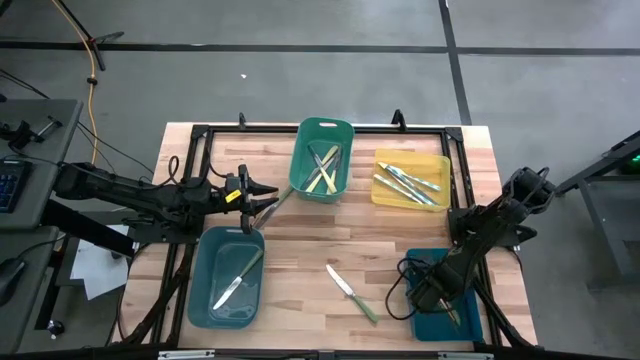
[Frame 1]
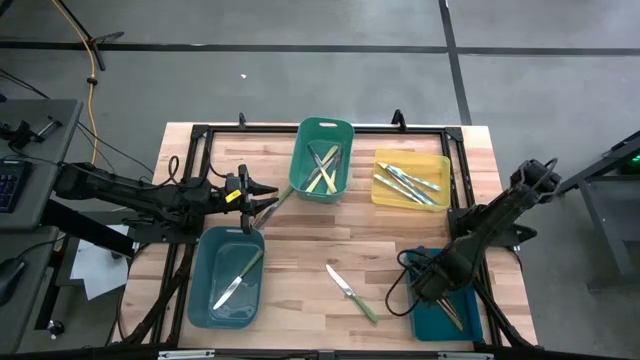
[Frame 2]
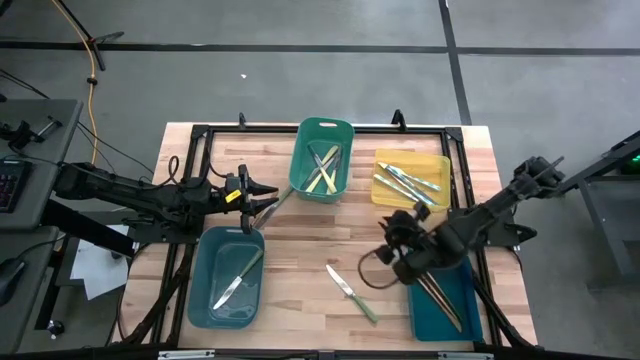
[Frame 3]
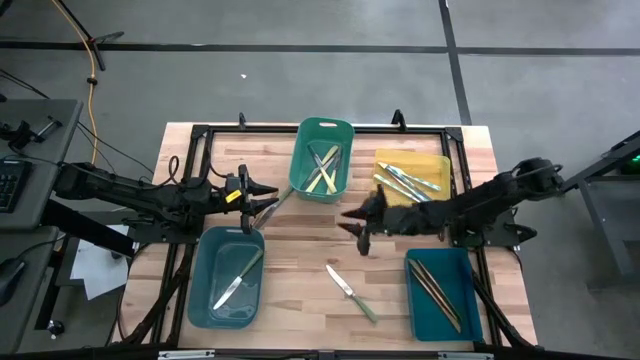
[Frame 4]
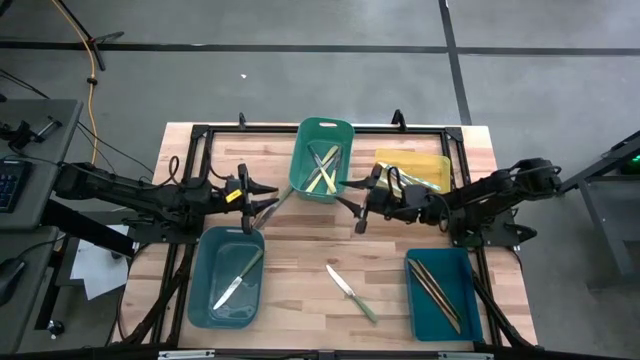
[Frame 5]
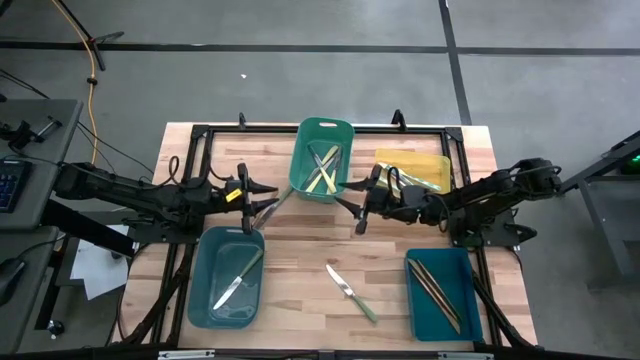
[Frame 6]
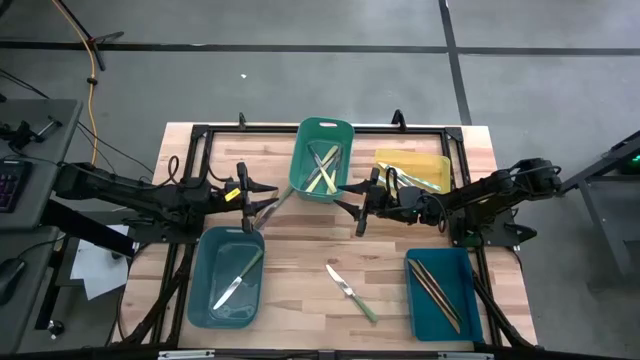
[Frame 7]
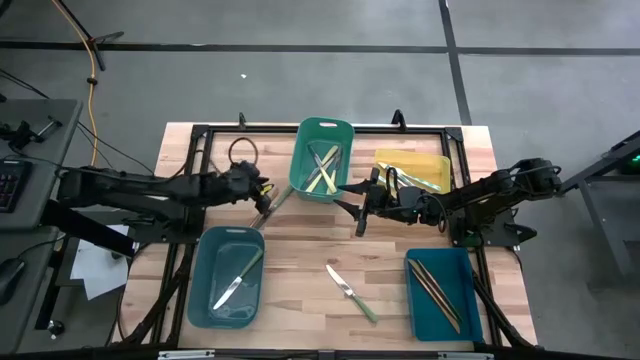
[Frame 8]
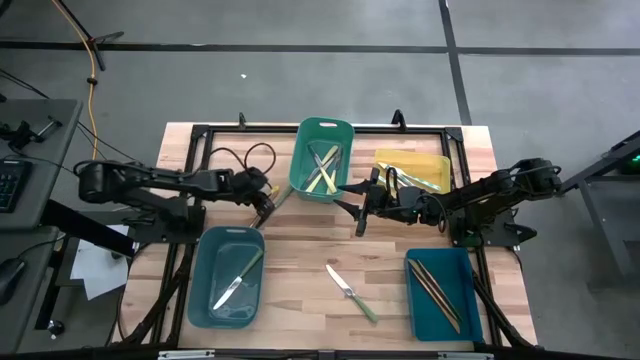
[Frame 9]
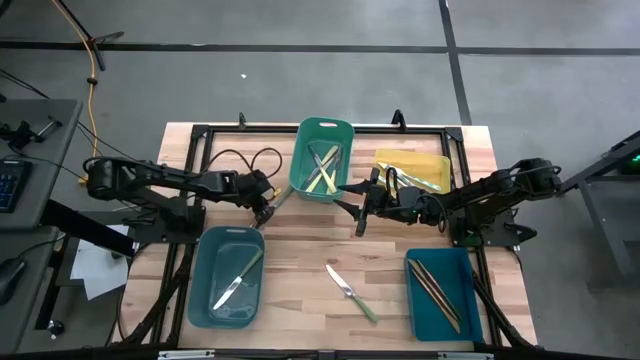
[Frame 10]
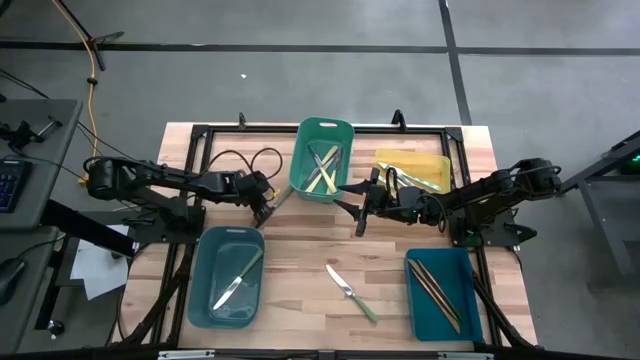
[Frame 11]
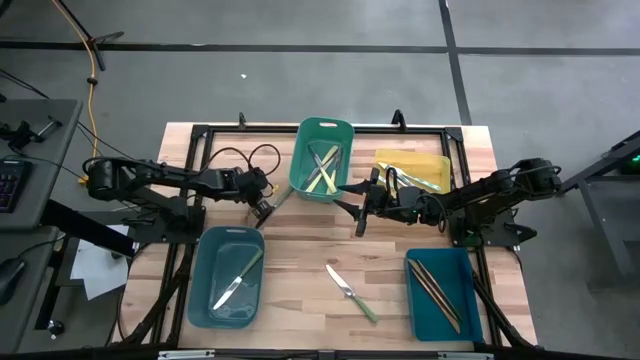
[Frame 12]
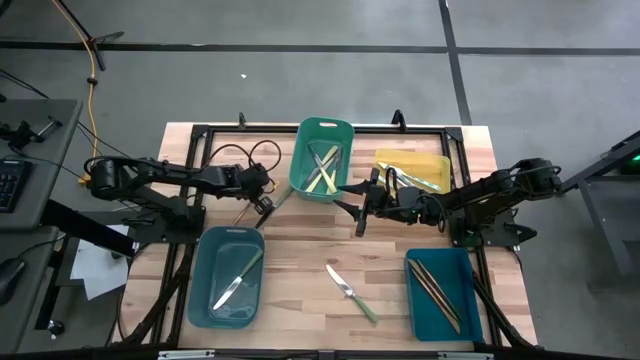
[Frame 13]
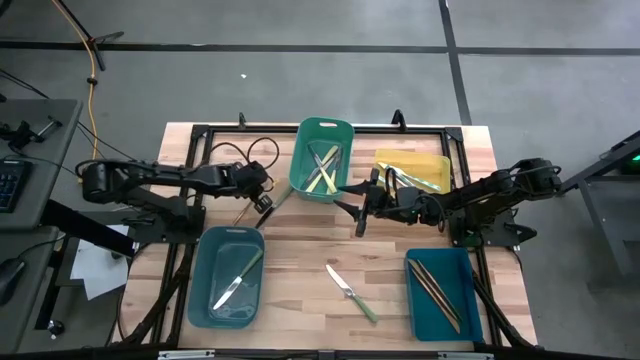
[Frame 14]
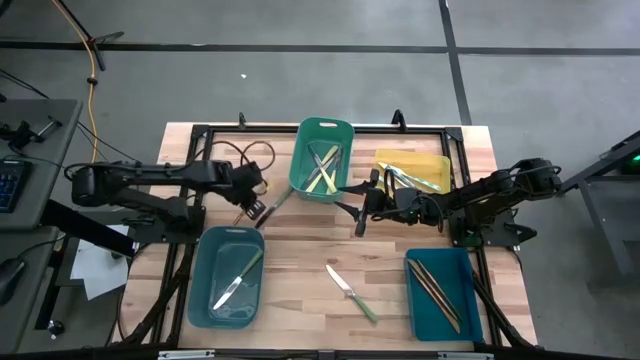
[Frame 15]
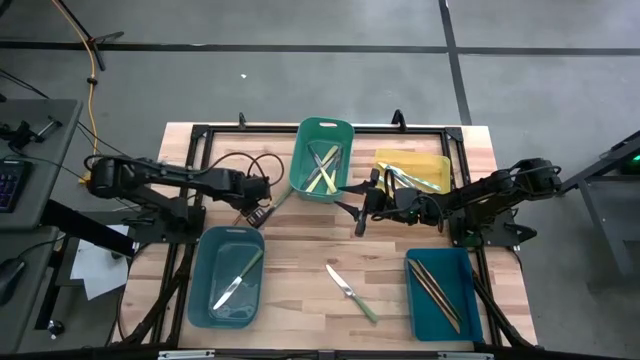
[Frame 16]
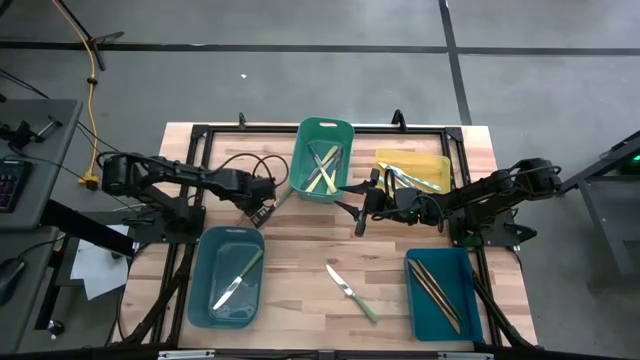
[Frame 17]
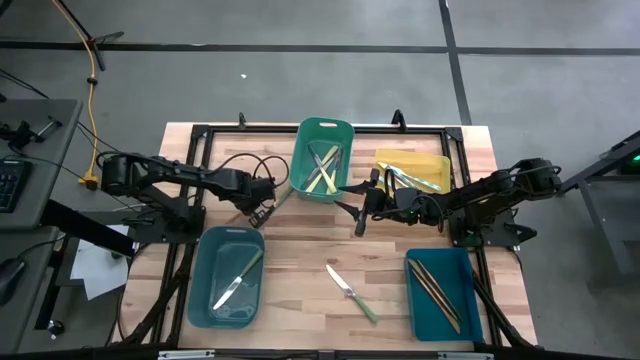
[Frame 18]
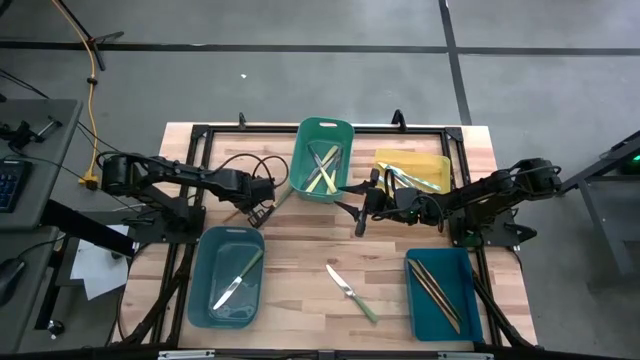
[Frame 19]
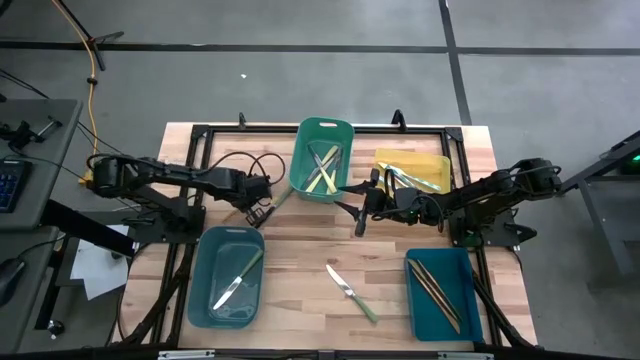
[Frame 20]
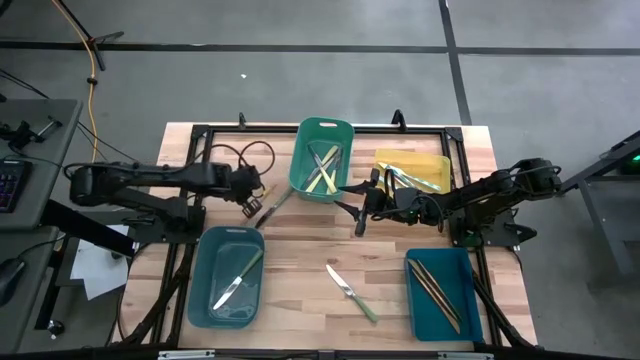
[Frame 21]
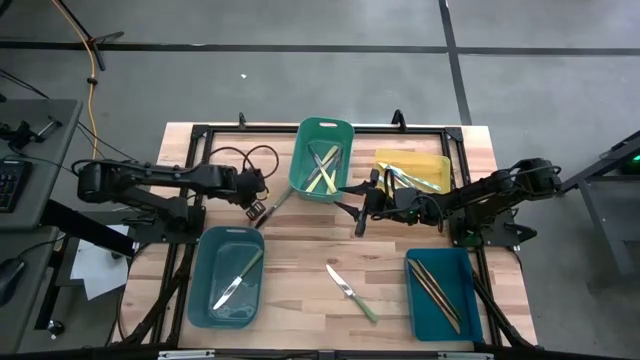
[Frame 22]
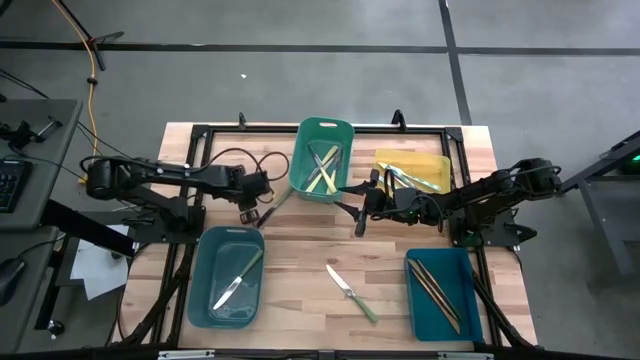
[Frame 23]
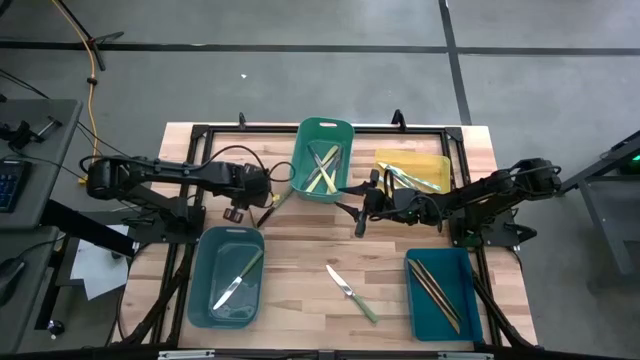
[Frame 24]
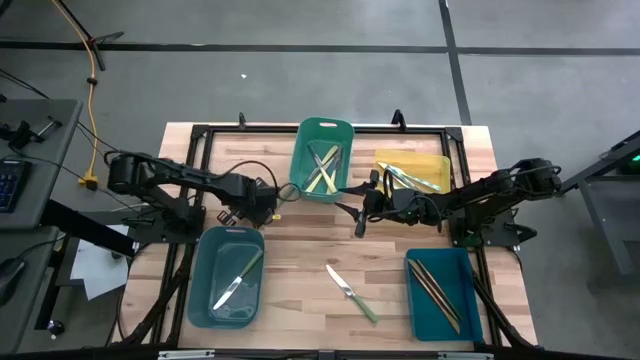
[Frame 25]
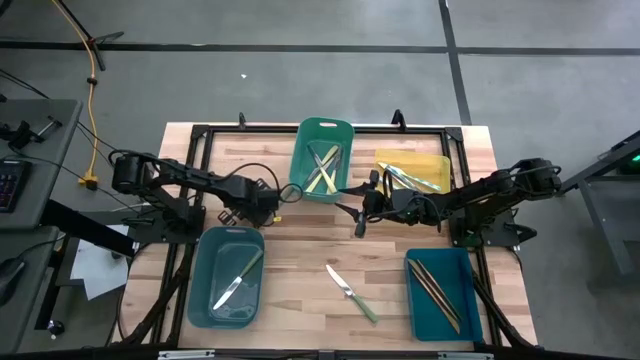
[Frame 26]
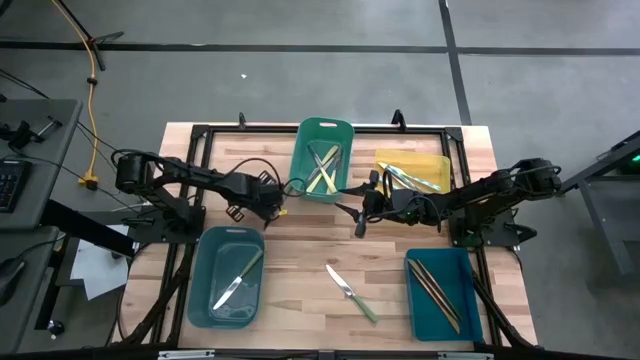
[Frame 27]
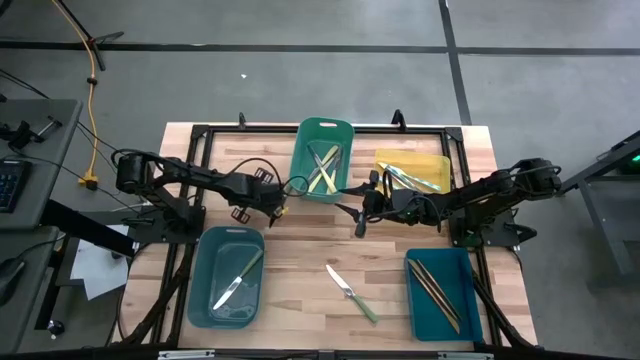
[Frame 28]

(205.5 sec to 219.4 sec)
Task: Sort silverware by color (type)
Put the gold knife into the right blue bin

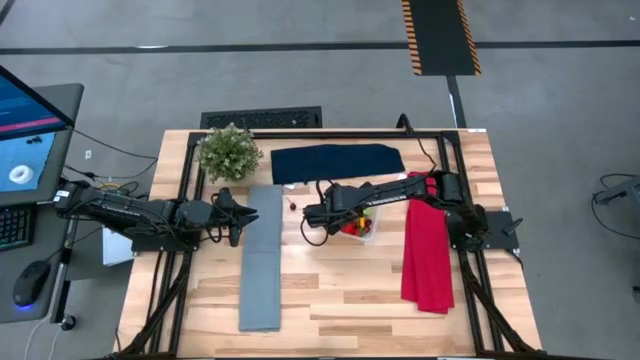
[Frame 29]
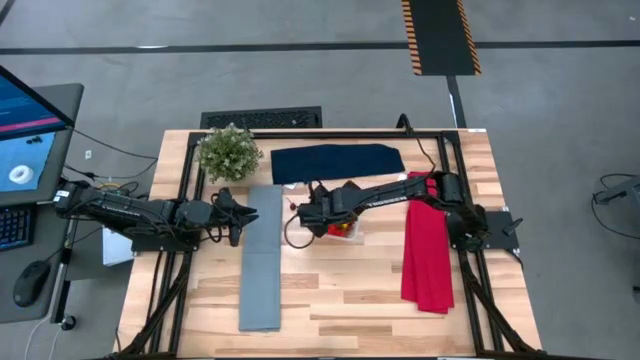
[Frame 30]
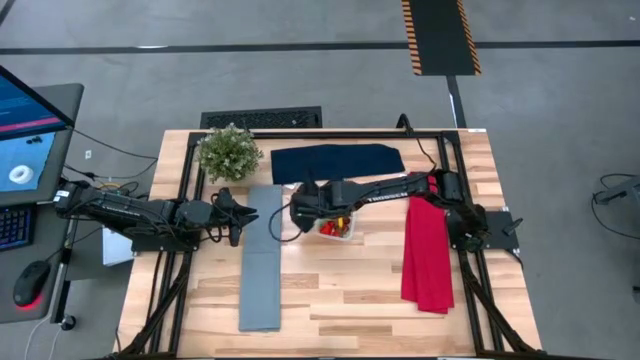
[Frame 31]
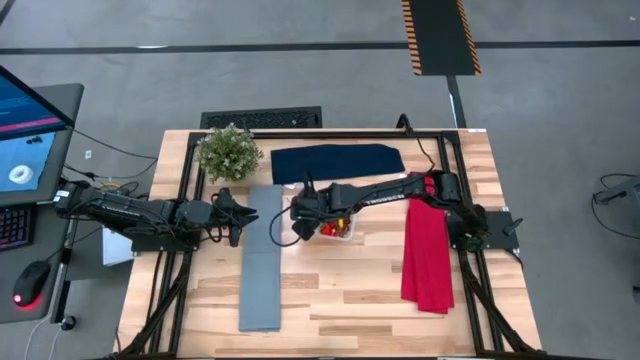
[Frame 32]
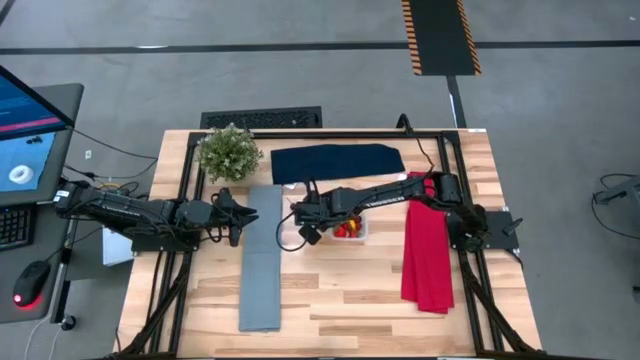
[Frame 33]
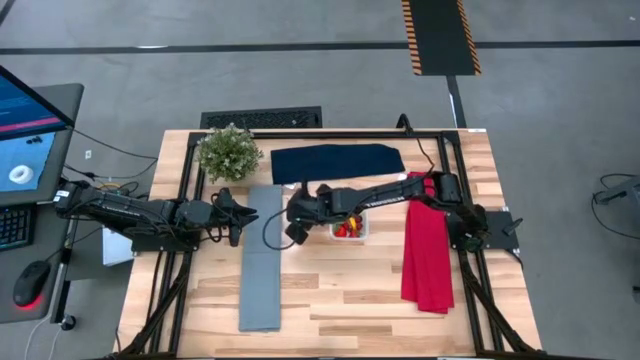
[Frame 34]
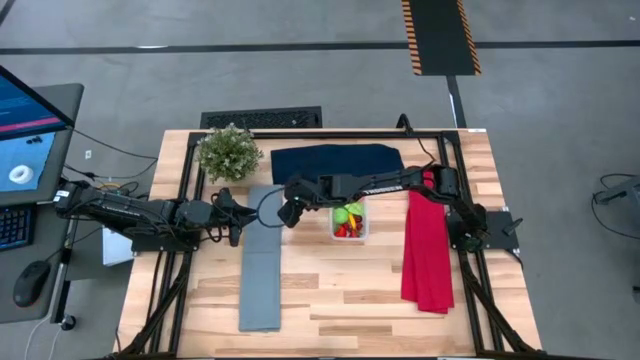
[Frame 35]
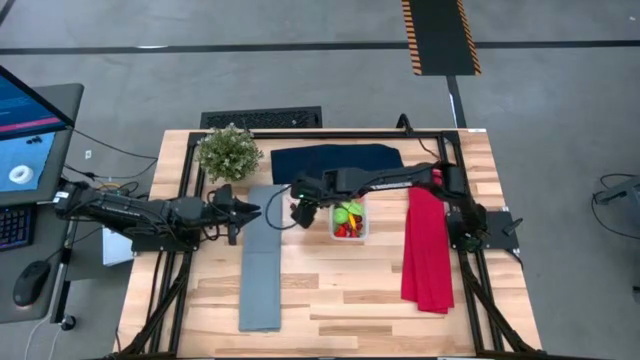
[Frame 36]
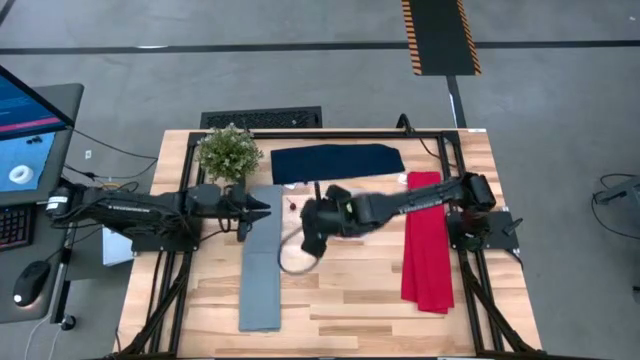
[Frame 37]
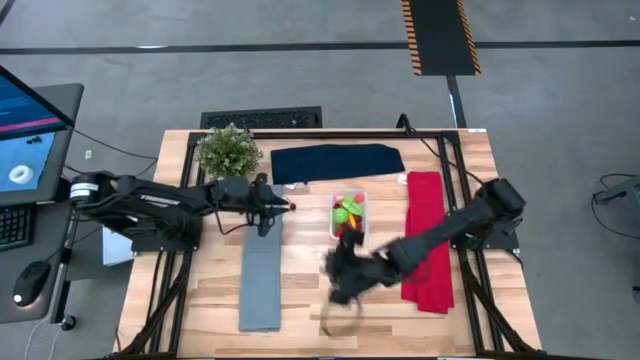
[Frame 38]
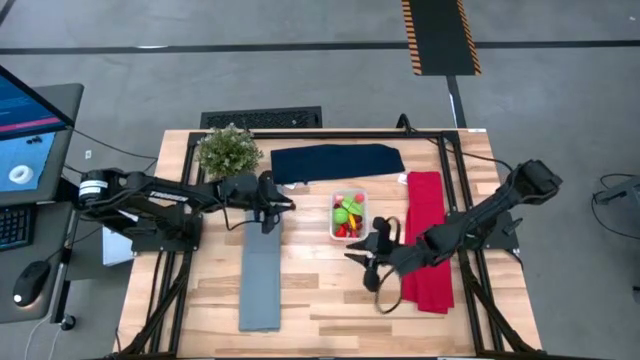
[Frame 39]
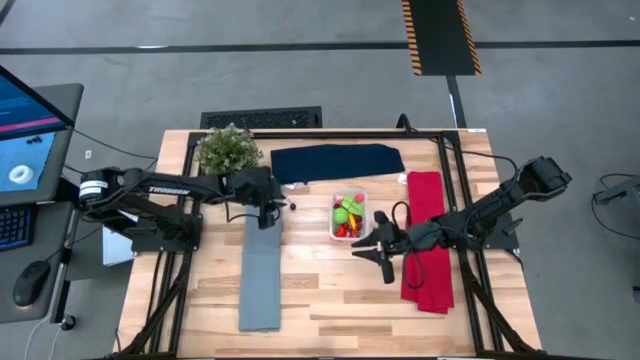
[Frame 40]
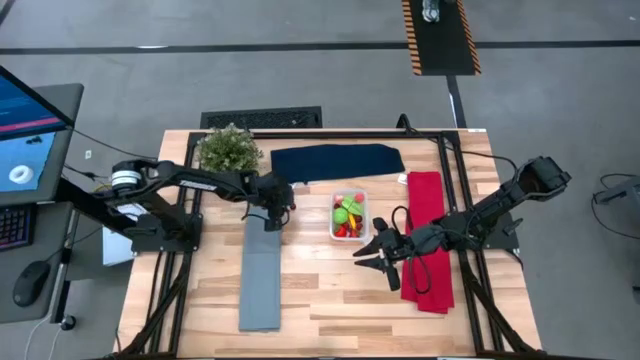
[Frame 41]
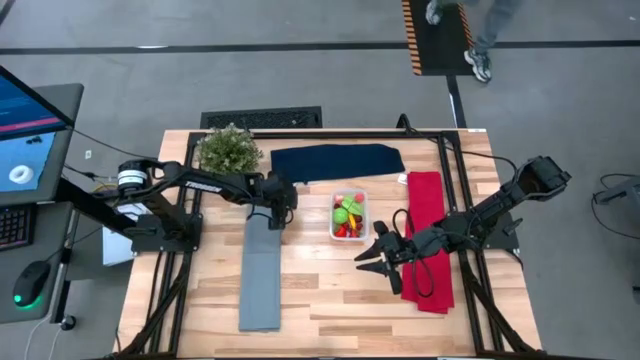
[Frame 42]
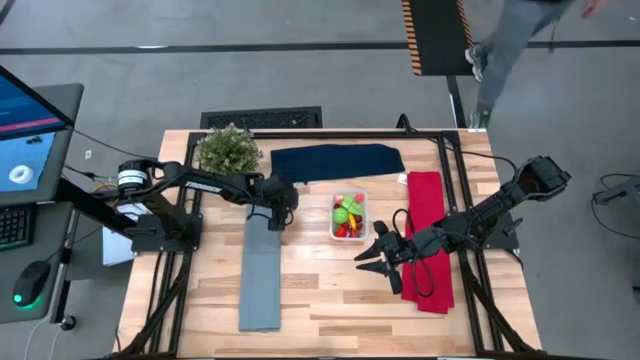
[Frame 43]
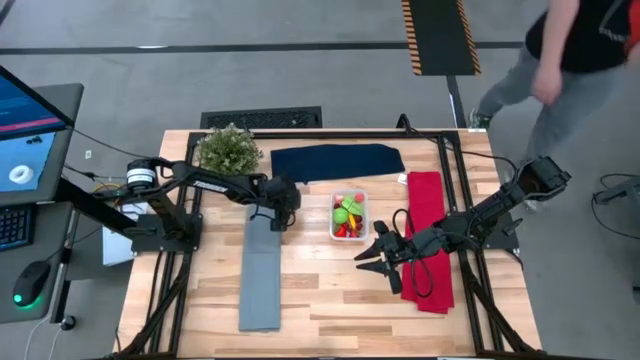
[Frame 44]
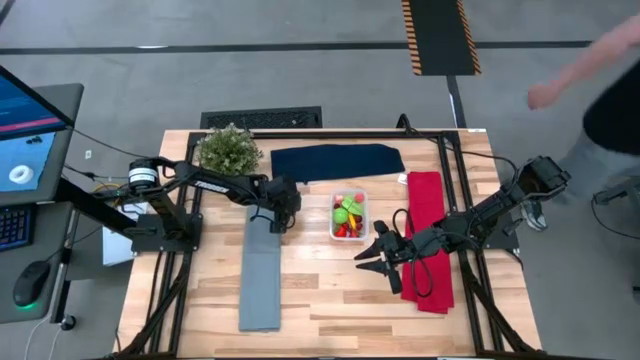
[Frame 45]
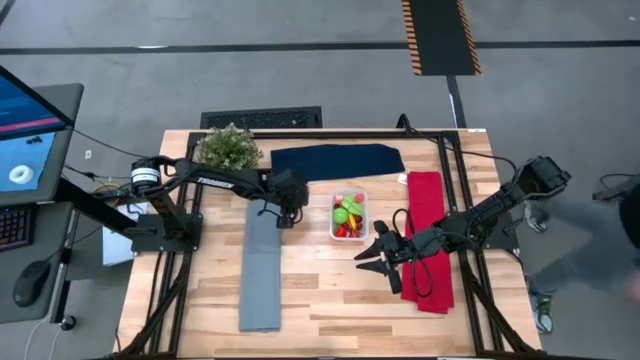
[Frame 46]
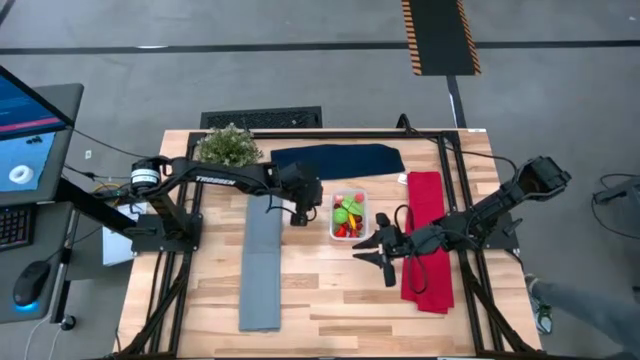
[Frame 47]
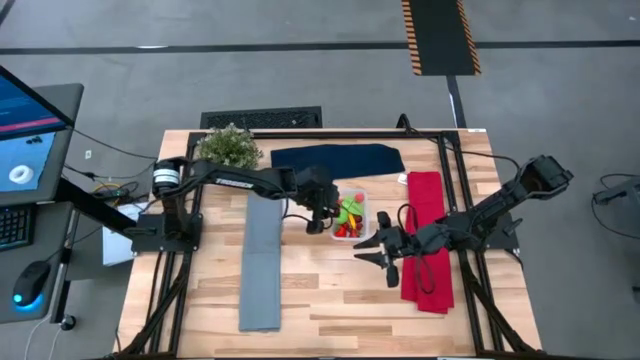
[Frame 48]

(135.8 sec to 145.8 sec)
Task: Pick and placing Produce into tupperware
Put the red cherry into the transparent bin
